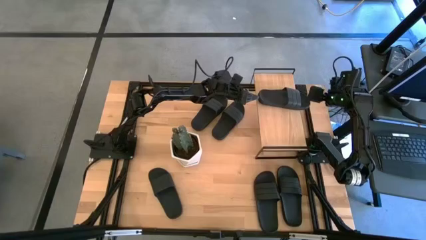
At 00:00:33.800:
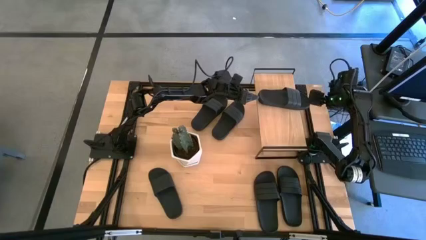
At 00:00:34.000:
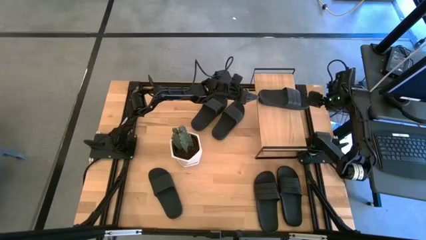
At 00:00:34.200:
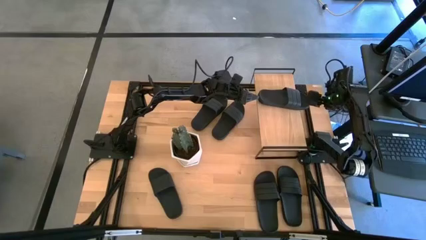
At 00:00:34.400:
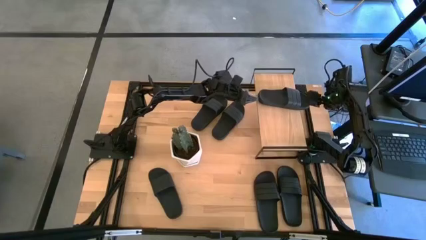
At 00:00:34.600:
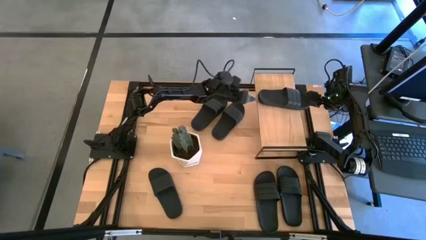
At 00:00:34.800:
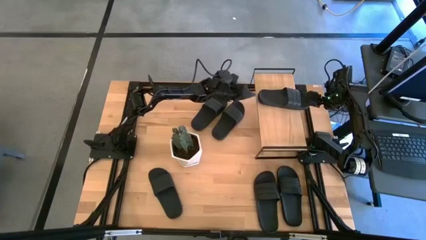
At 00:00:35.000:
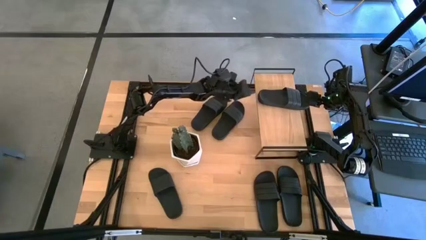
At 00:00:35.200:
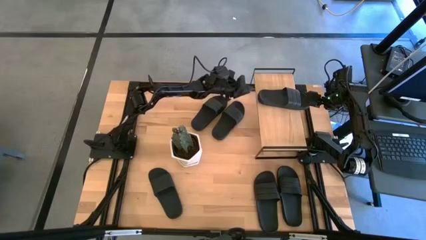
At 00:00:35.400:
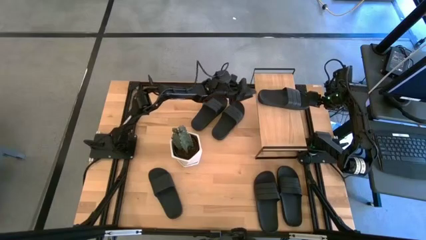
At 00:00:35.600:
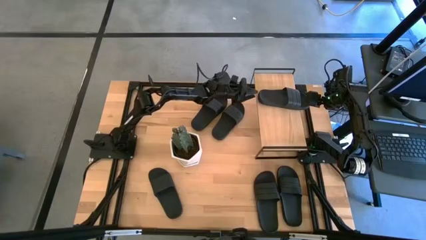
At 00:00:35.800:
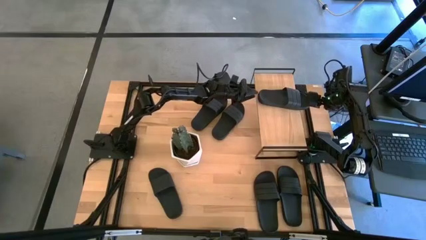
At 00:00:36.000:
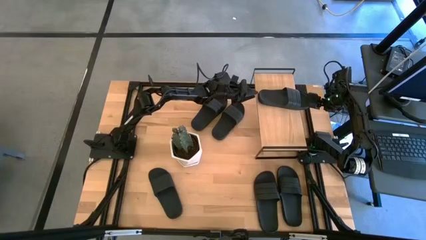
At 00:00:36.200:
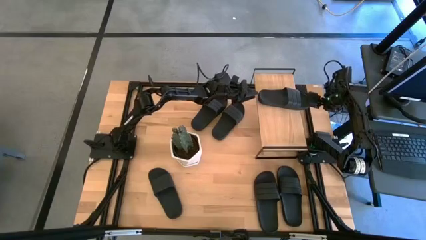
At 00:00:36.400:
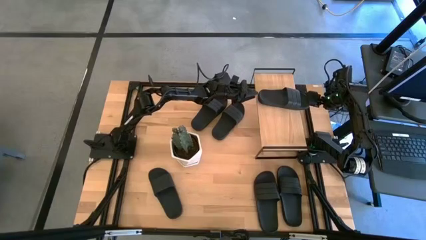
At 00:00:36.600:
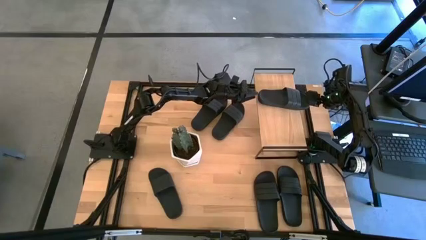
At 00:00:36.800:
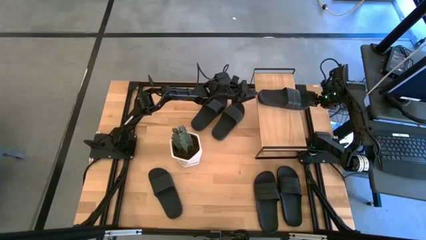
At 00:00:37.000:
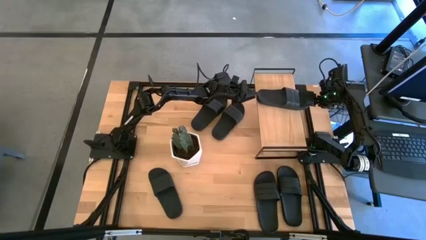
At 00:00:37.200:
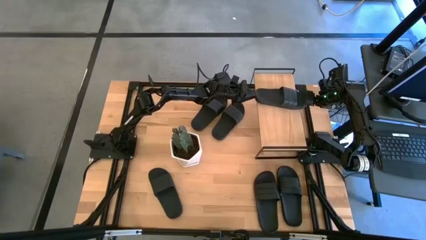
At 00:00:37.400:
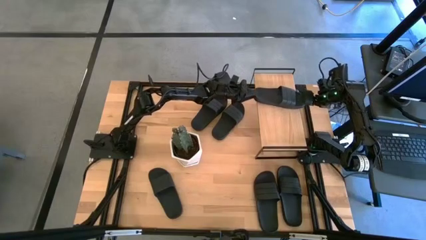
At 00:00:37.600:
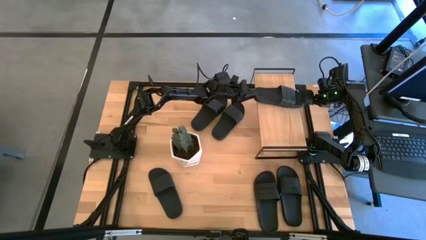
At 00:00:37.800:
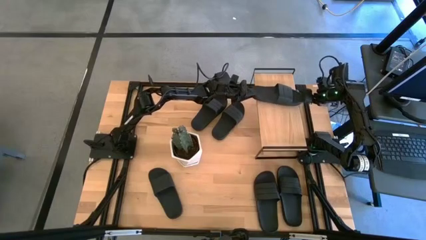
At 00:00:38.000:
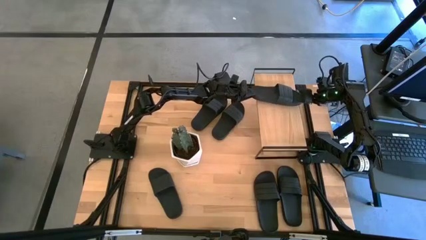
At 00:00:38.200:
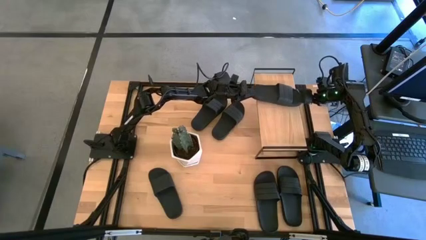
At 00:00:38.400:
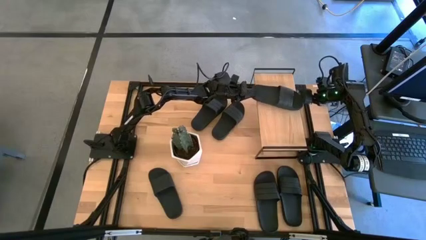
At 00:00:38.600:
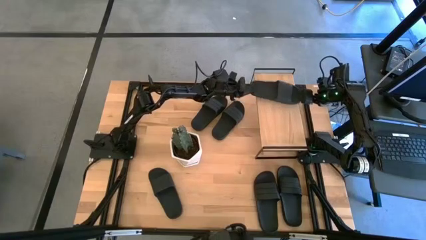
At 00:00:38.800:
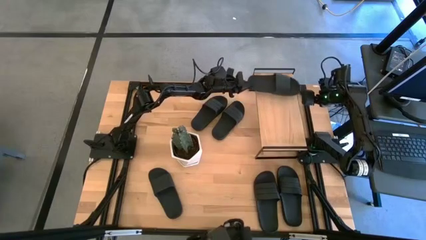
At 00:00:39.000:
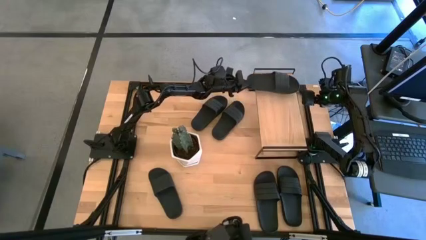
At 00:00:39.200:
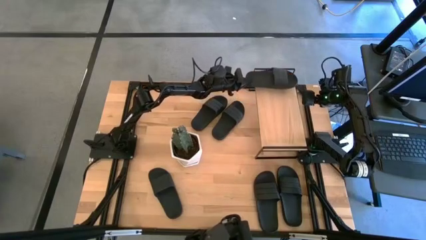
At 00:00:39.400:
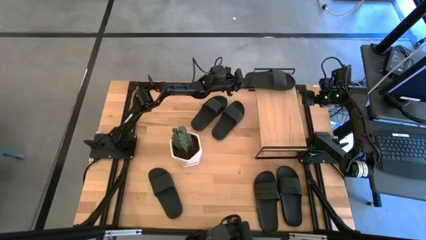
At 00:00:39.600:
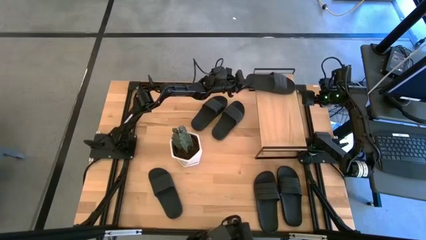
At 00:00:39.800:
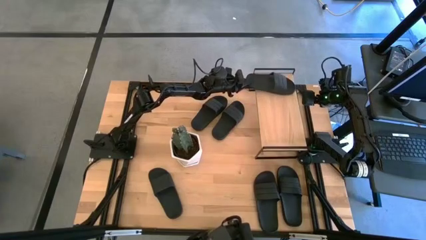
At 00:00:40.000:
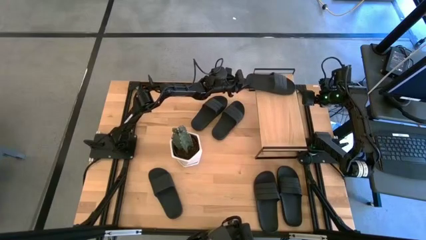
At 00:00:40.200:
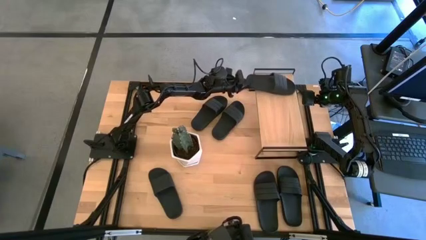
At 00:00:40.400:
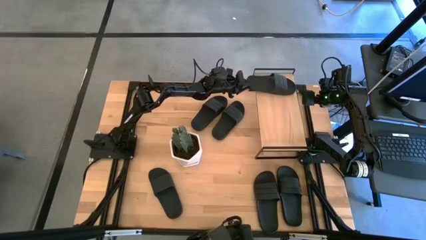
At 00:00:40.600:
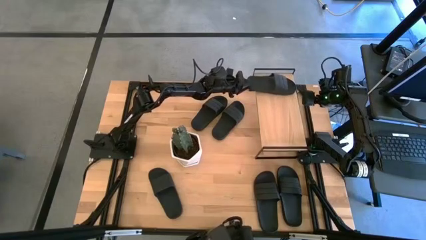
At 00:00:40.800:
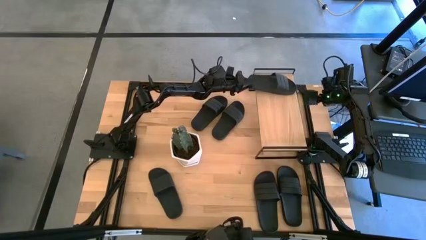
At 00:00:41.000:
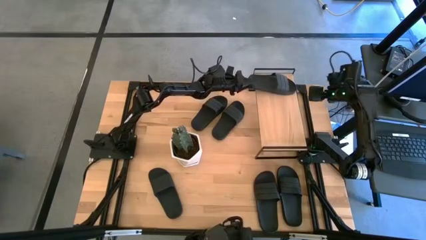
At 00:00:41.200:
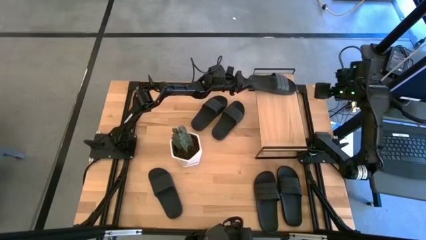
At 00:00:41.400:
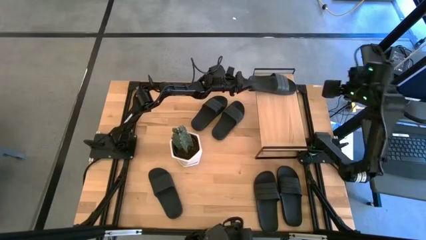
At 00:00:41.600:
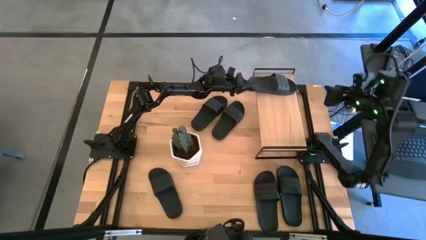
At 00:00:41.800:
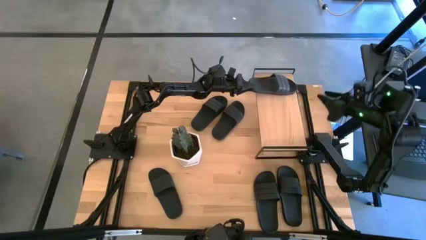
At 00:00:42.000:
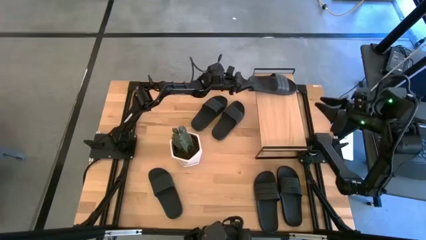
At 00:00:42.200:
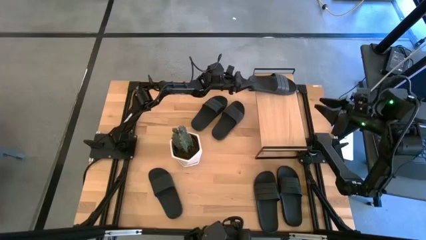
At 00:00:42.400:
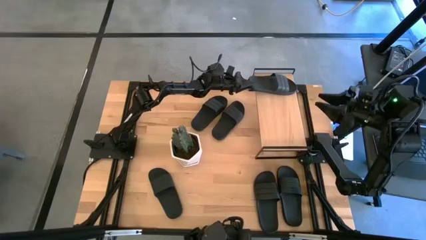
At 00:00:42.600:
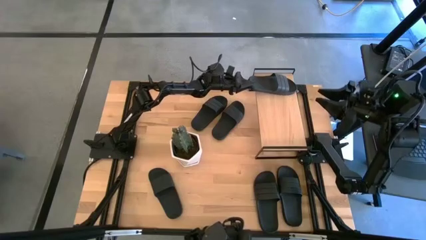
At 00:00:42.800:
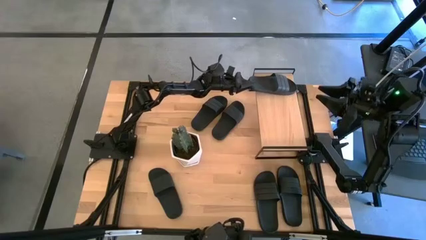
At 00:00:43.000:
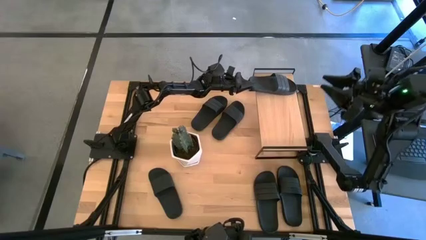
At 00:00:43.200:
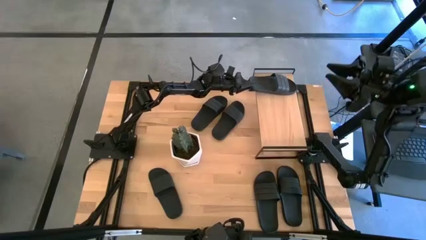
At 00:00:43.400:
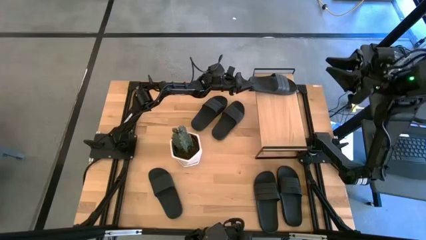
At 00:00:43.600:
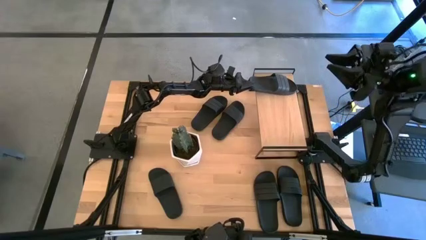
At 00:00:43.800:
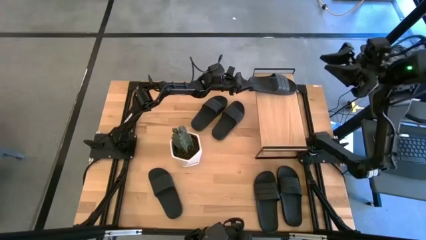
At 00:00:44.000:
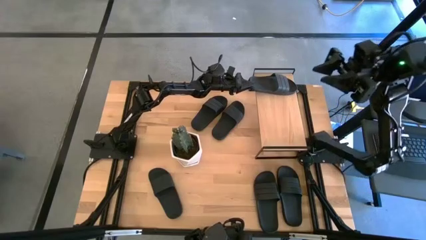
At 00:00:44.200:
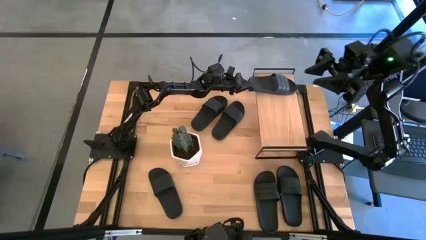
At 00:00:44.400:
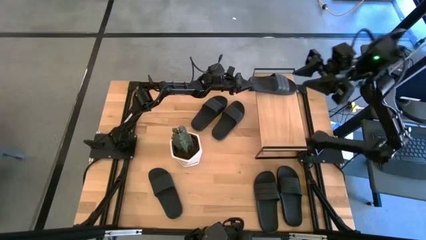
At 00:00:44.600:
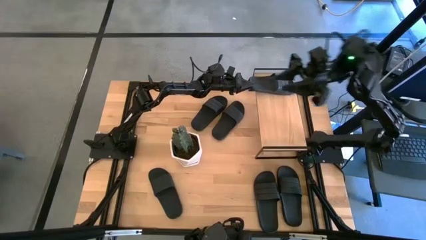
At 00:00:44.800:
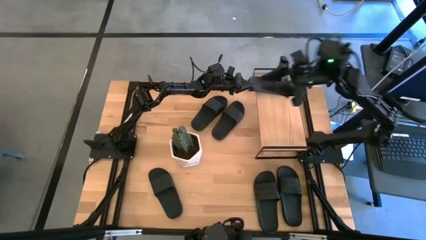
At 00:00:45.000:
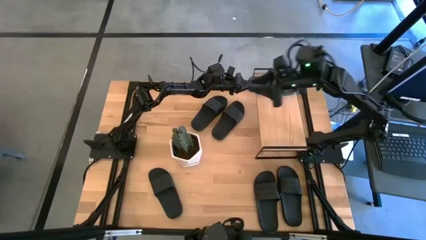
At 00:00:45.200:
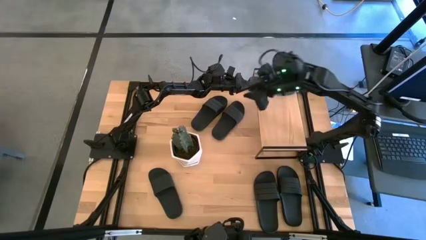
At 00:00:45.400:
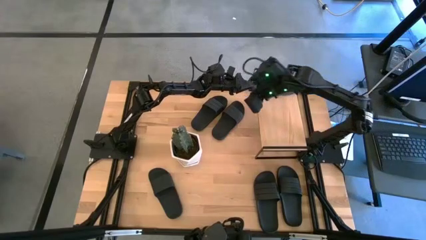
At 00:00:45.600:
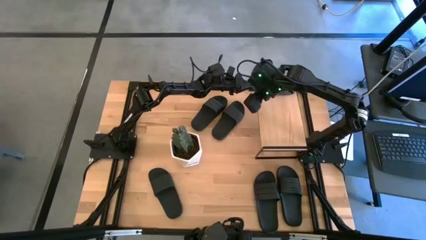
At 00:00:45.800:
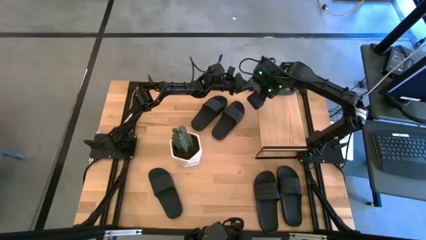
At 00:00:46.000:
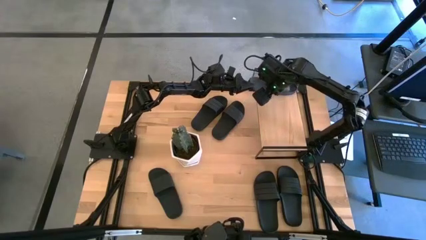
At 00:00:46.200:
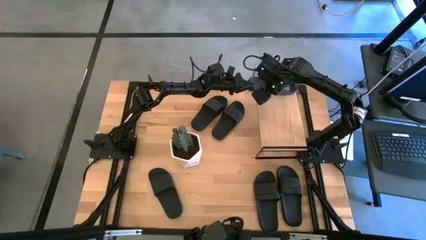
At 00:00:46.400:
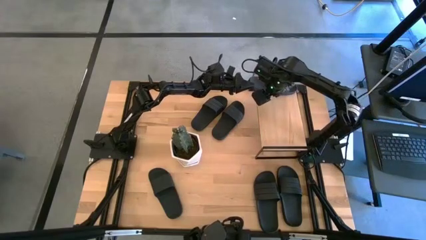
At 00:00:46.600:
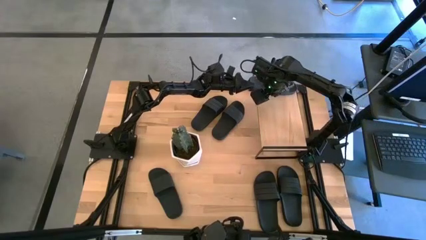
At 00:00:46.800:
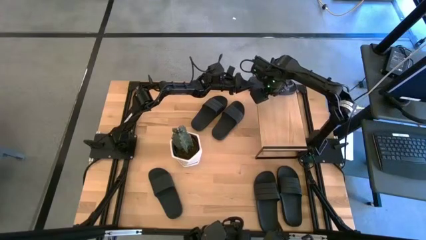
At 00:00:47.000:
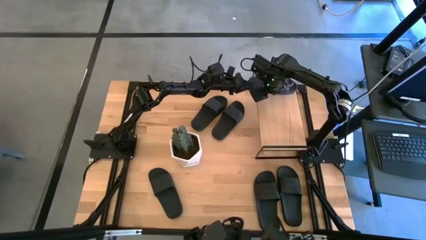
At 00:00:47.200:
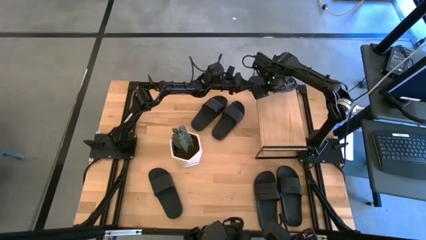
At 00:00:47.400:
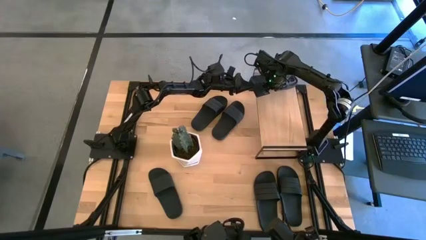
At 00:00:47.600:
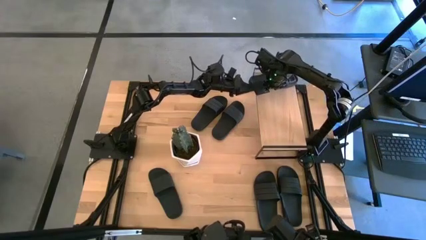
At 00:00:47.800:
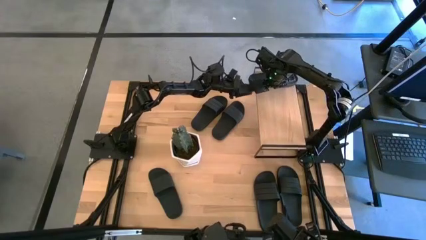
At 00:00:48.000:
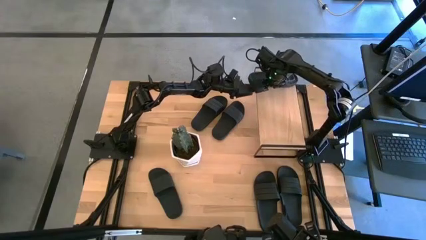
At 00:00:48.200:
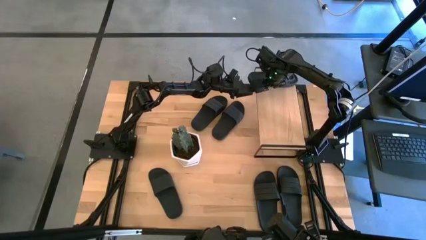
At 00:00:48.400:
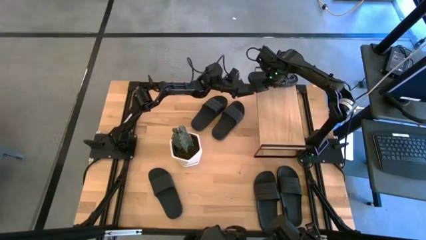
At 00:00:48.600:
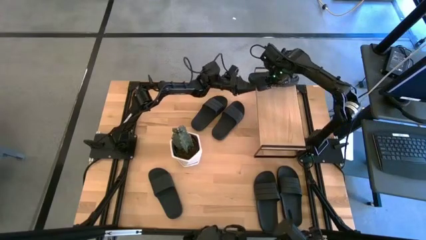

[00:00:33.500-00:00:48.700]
Task: Pick and place slides into the shelf
Put the black slide on the shelf
